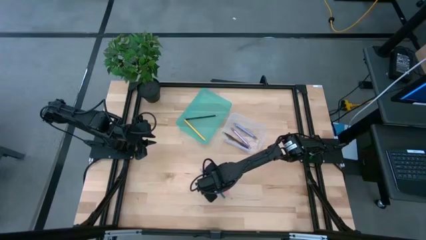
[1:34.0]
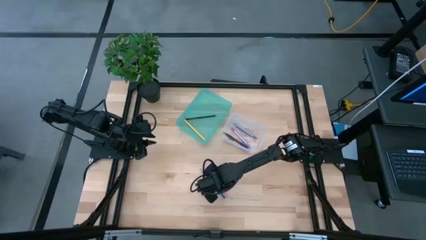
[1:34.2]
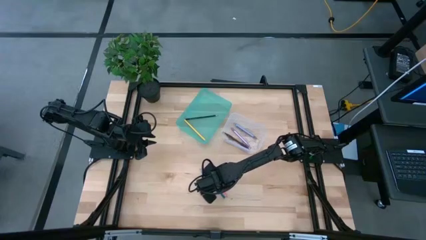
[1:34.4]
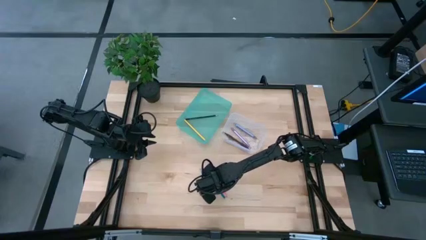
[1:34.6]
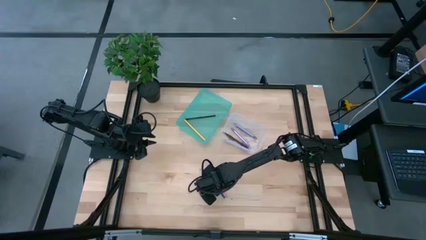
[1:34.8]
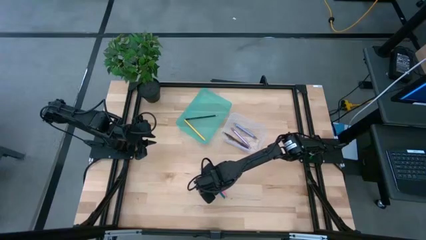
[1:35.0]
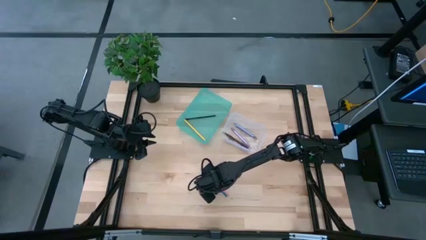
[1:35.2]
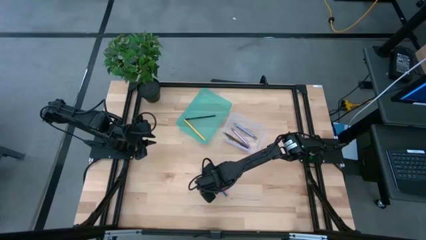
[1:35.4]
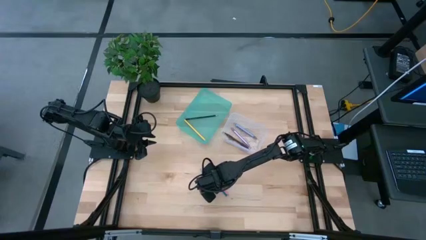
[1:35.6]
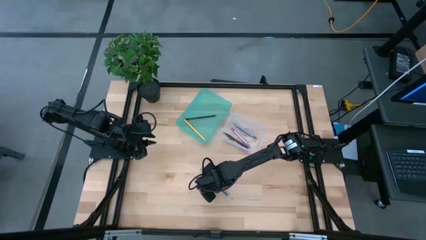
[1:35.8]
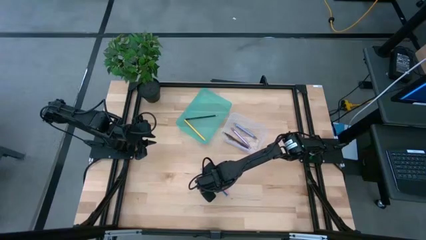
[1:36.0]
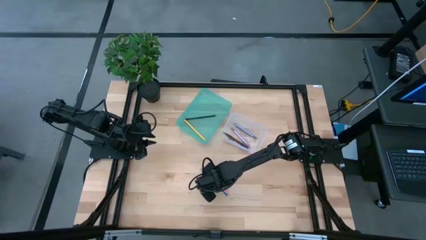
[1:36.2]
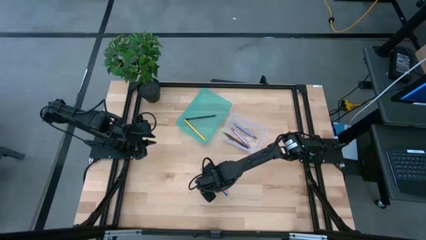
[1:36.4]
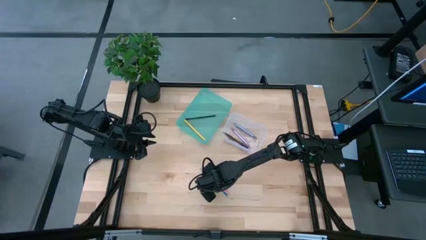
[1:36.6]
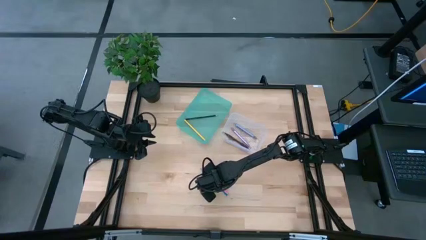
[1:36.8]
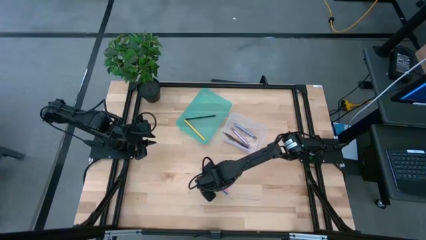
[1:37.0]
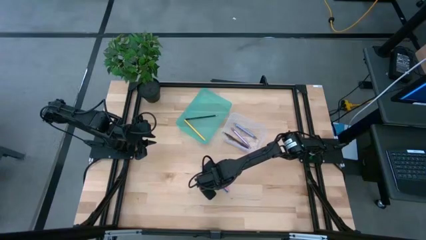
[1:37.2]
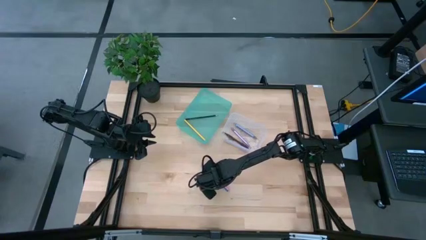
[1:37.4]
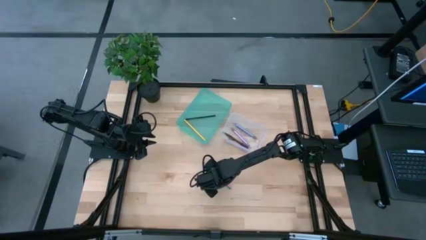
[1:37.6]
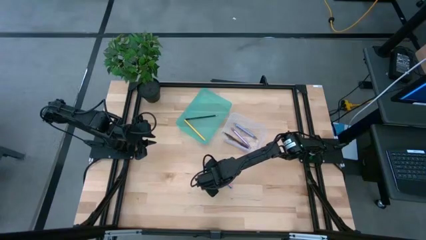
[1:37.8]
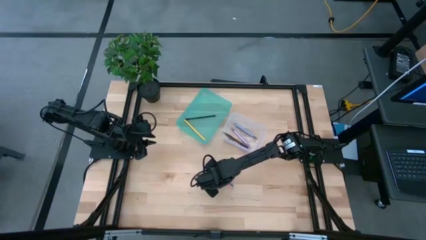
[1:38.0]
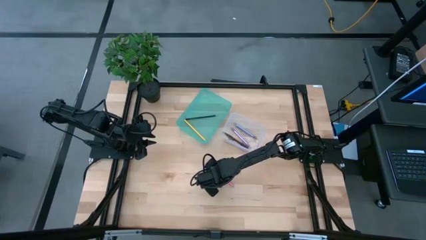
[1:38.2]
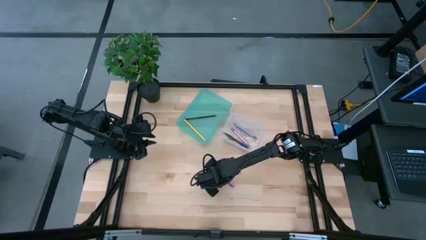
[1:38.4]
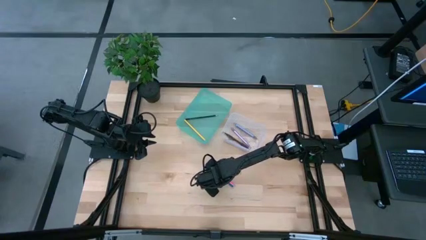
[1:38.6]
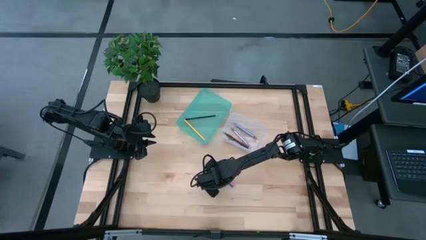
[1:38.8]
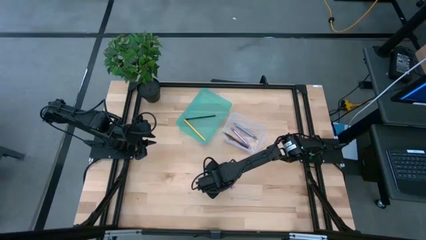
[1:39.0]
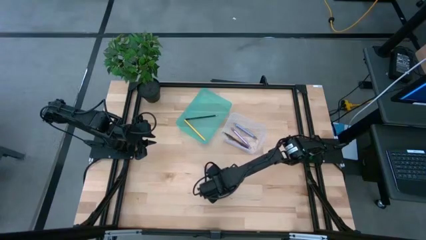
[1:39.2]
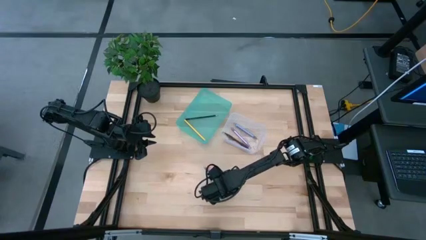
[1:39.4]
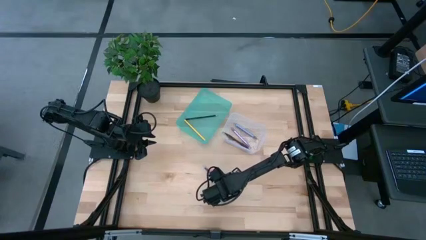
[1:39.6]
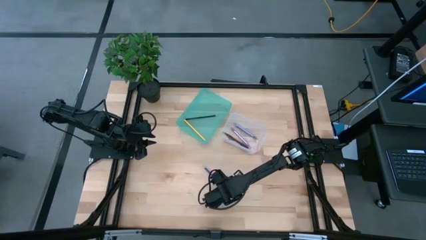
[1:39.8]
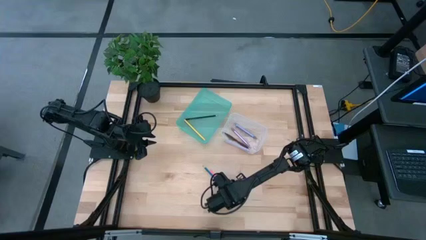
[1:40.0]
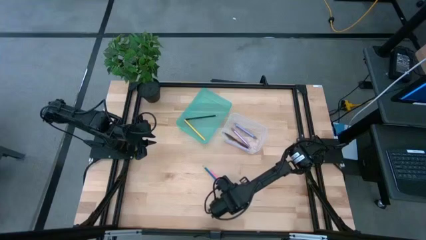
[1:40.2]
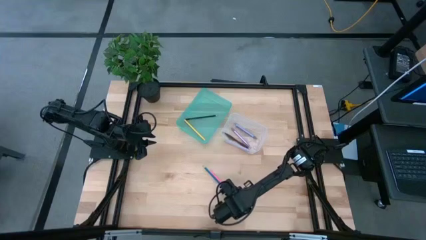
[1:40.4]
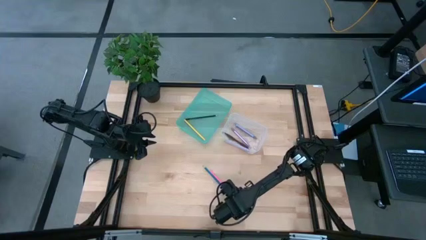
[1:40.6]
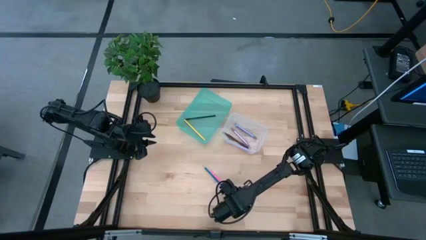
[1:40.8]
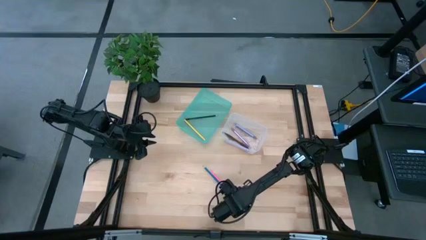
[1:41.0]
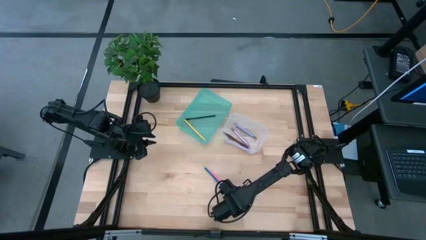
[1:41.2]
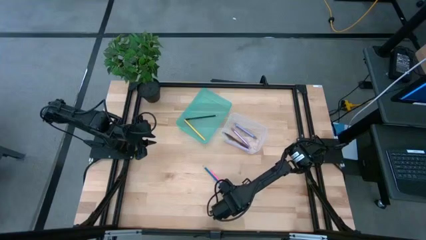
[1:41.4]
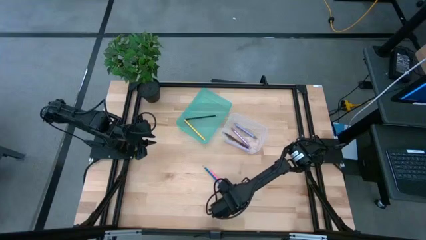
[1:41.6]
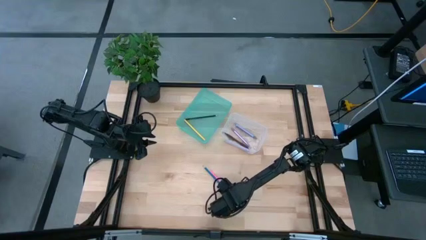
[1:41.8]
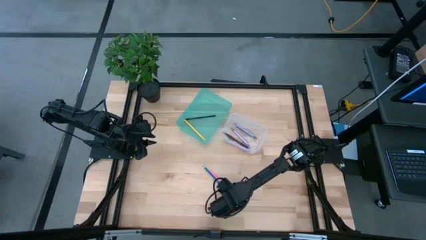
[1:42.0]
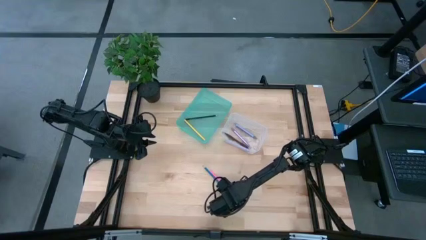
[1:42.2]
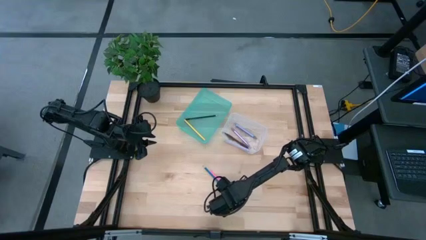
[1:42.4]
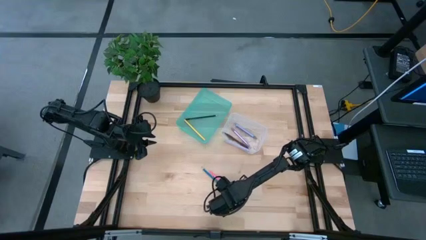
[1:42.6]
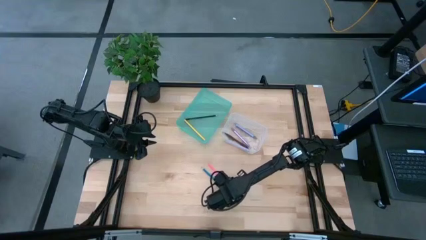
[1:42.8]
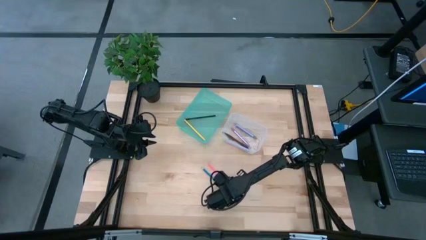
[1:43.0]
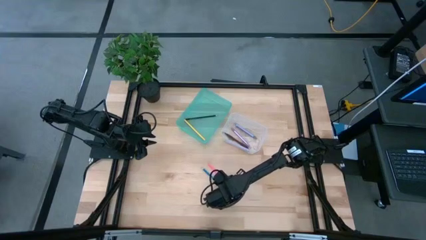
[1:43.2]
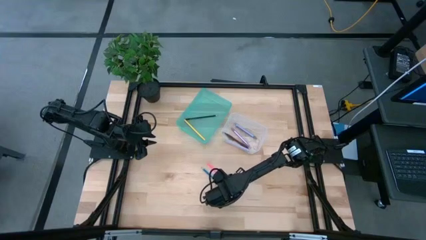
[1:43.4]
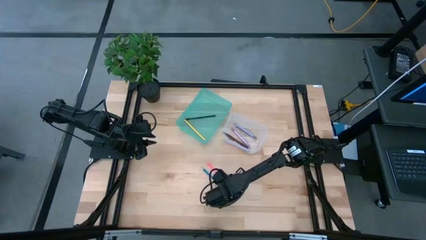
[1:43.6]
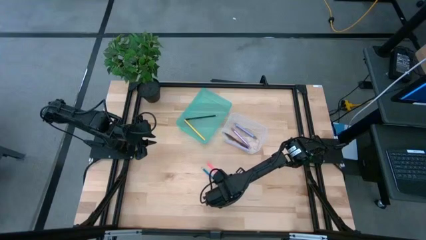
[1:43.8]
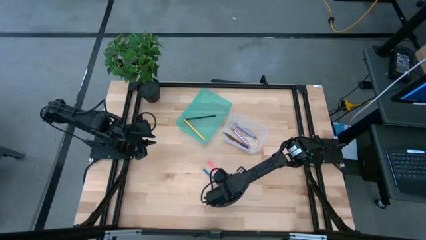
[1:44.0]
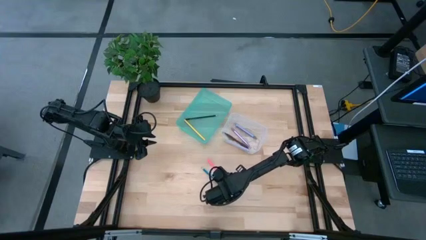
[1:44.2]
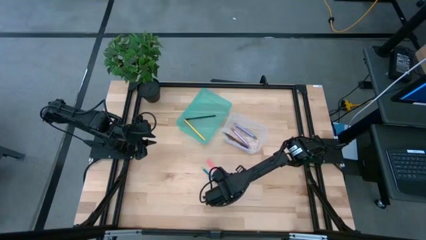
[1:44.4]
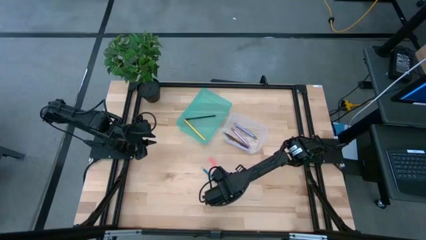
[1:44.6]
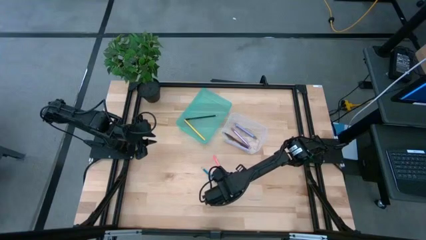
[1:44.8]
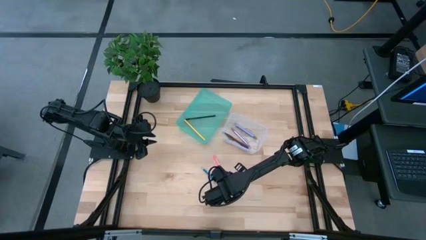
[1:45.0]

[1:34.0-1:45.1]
Task: Sort pens & pencils
Put the pink pencil into the blue bin

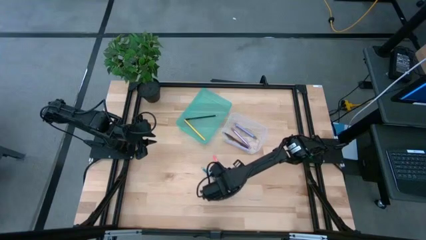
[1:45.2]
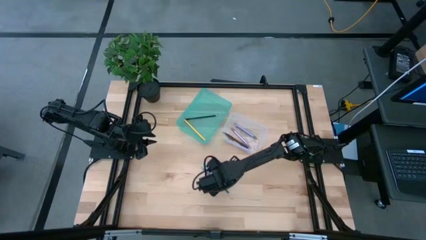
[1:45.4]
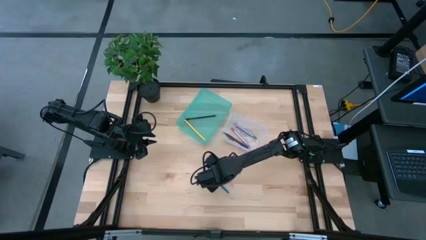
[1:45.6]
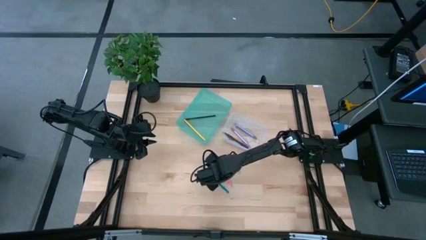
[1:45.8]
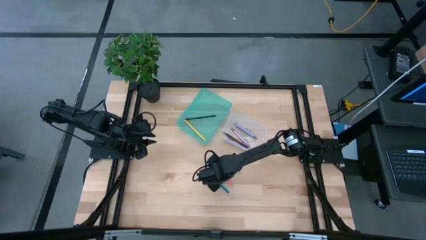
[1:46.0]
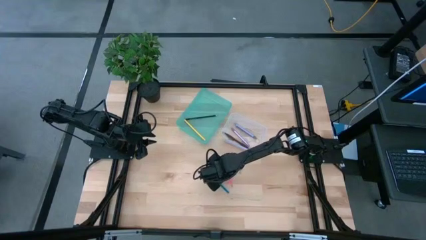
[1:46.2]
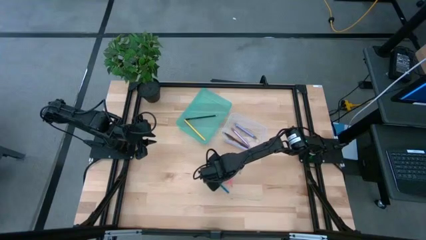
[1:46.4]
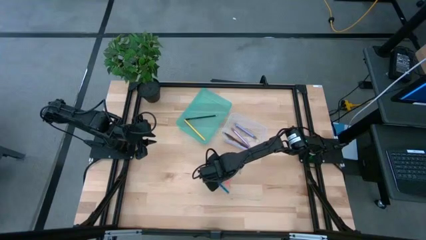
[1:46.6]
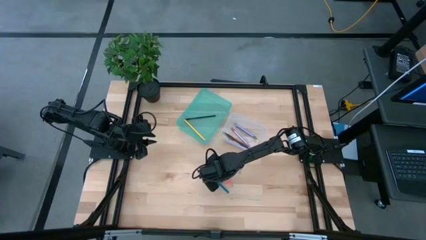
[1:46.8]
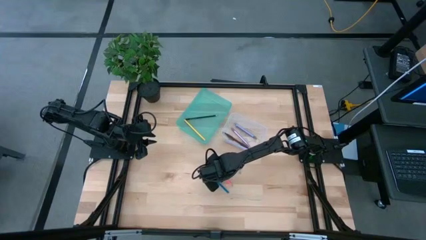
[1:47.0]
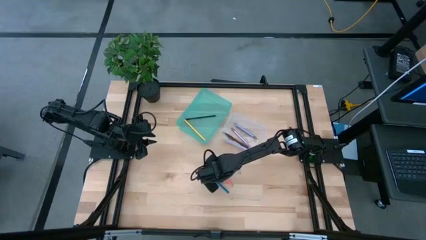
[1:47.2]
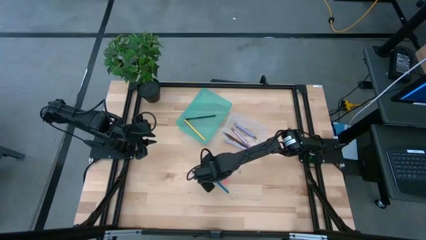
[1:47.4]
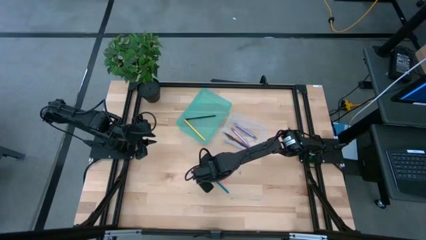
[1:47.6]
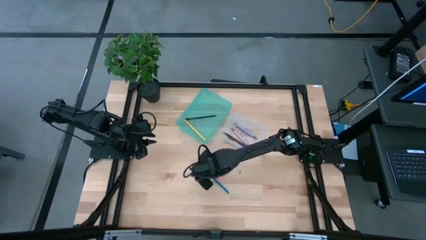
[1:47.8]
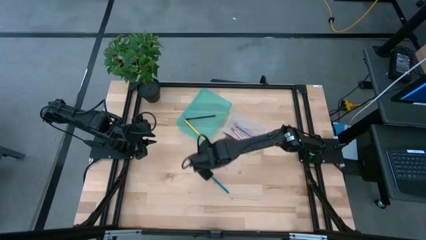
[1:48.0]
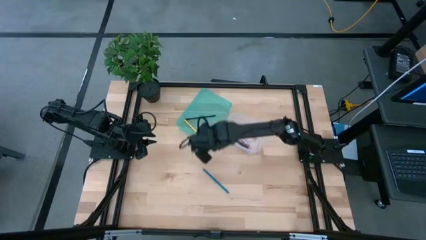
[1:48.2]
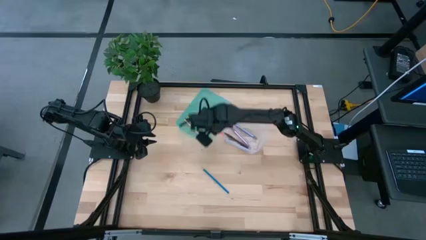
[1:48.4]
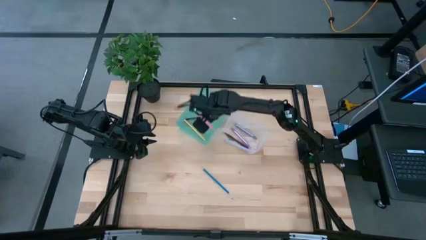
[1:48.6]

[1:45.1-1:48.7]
Put the pink pencil into the blue bin

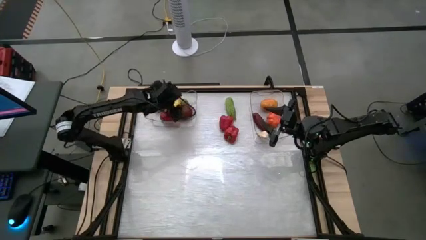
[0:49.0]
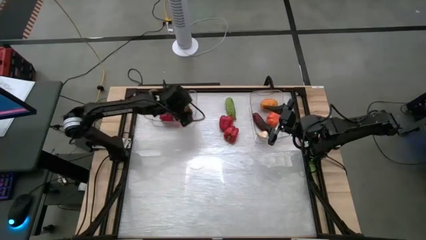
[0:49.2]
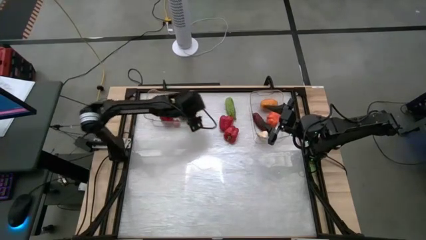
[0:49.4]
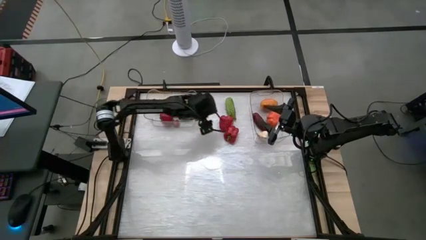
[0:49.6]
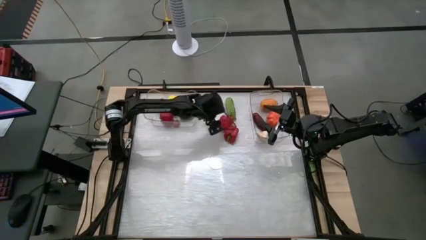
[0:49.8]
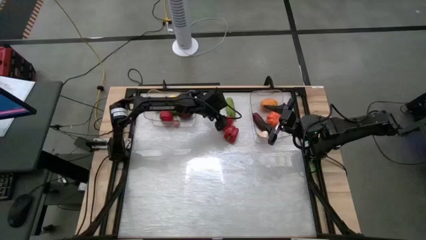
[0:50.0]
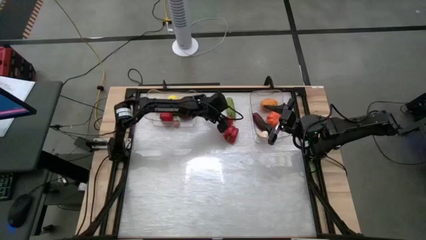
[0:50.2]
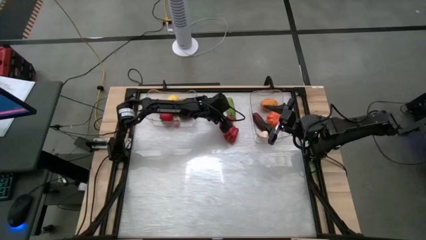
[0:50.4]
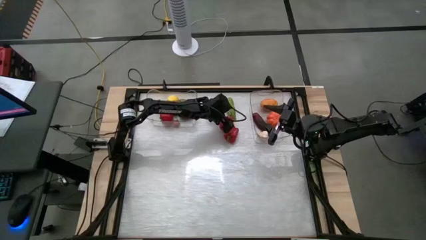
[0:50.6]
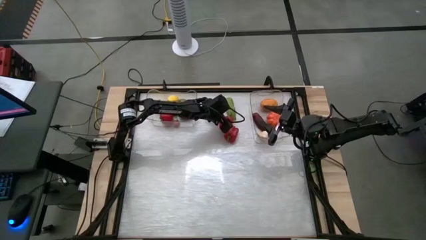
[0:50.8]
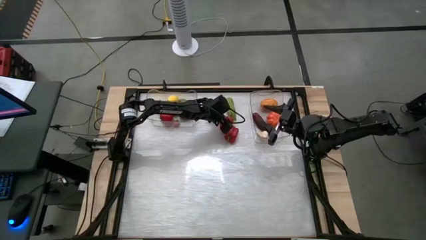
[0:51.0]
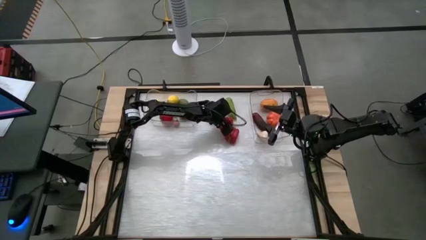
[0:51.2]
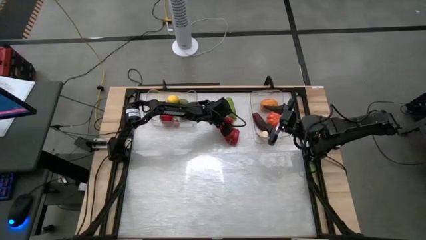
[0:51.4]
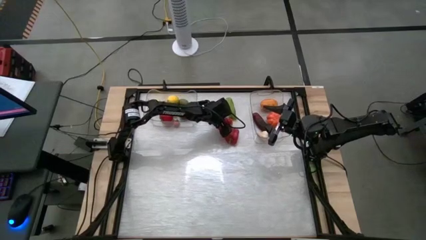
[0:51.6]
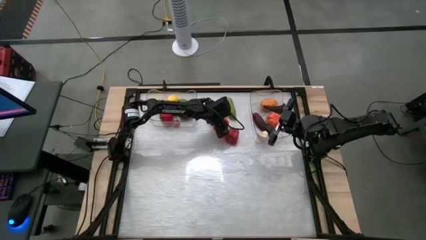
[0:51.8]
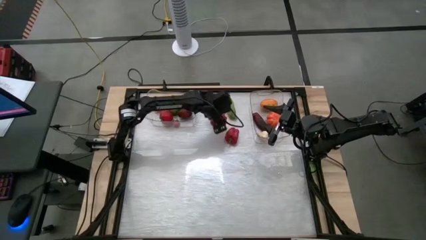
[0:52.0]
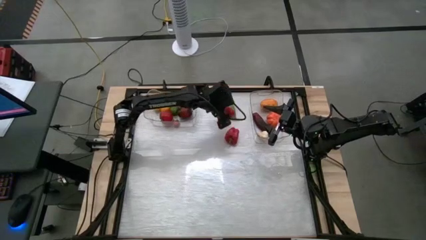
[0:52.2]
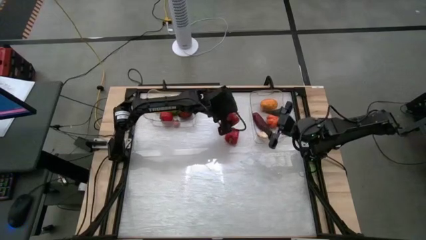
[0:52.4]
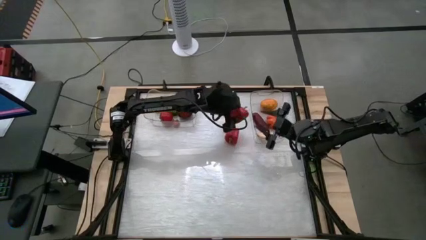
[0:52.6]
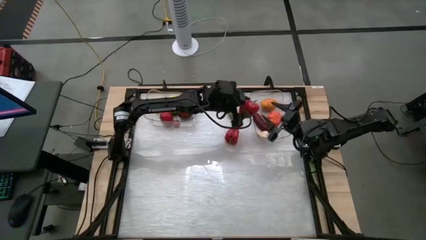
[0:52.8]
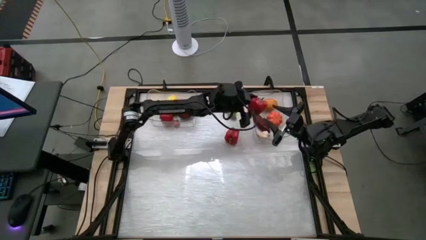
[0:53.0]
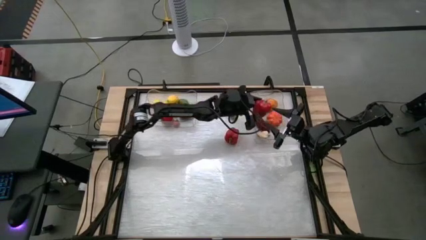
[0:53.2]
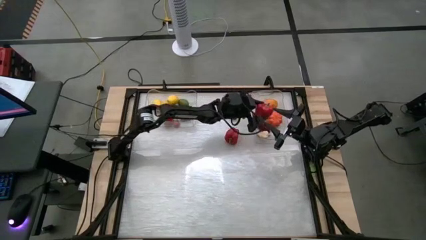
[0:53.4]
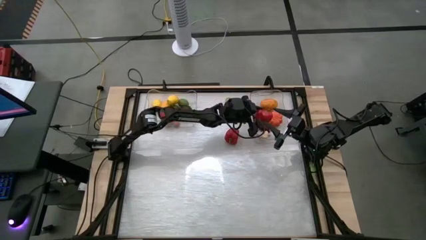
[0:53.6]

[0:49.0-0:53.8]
Task: Sort produce into baskets
Put the top red bell pepper into the right transparent bin
